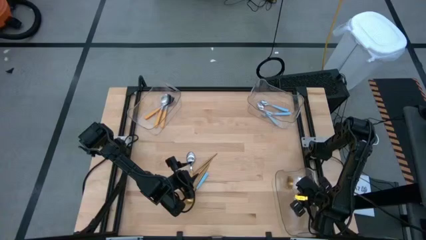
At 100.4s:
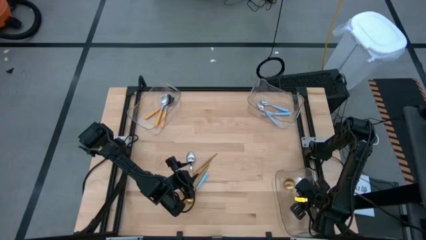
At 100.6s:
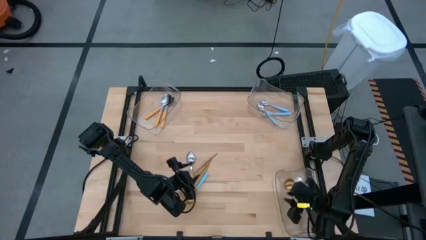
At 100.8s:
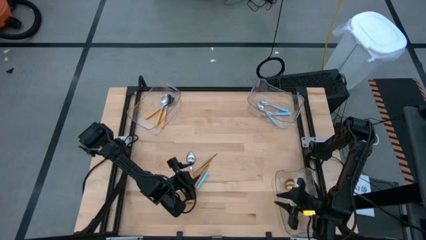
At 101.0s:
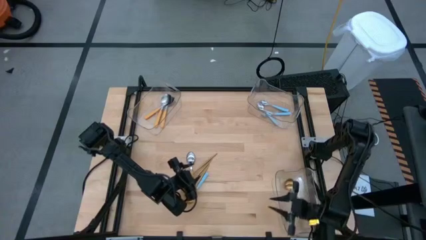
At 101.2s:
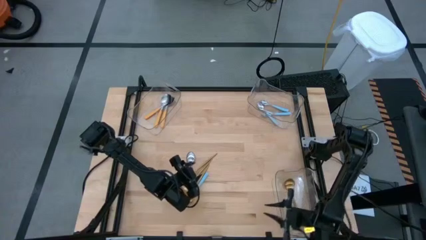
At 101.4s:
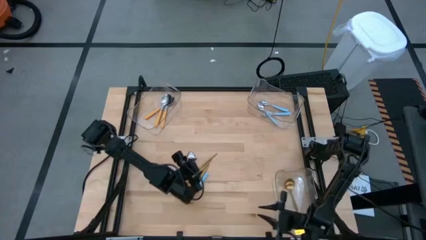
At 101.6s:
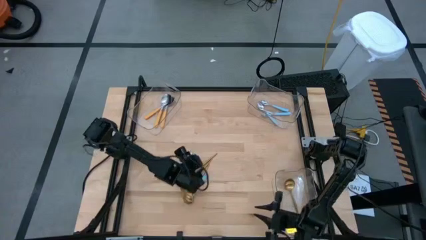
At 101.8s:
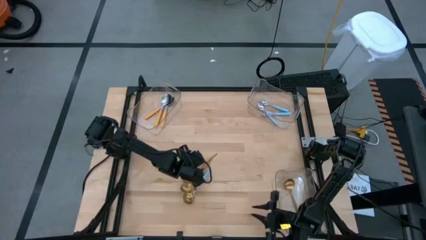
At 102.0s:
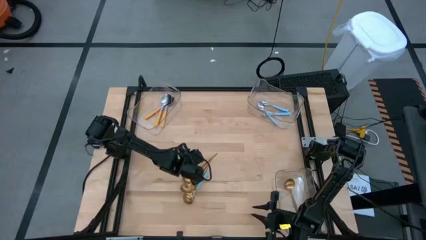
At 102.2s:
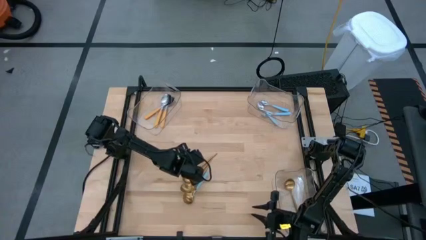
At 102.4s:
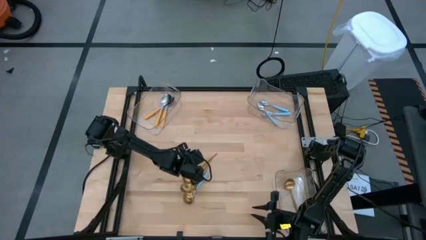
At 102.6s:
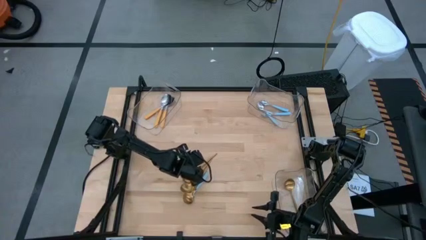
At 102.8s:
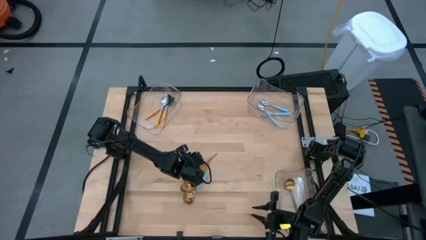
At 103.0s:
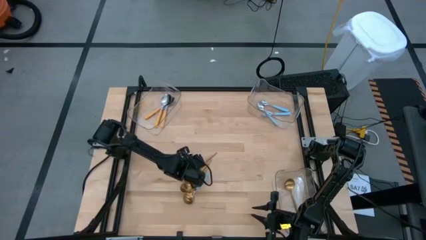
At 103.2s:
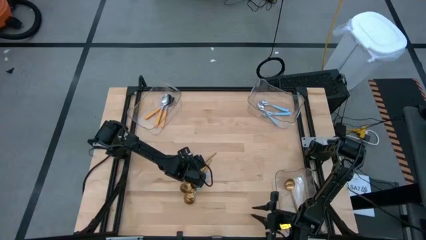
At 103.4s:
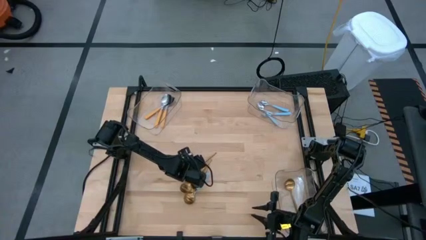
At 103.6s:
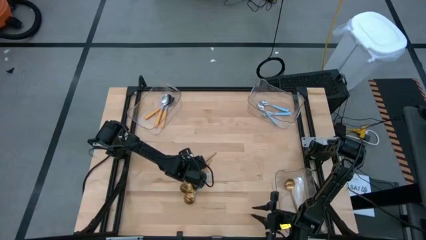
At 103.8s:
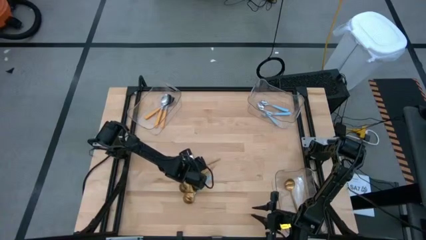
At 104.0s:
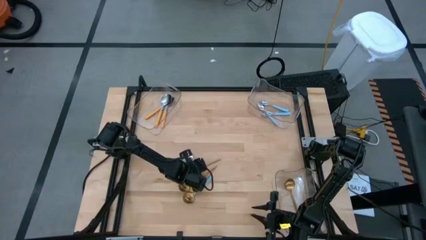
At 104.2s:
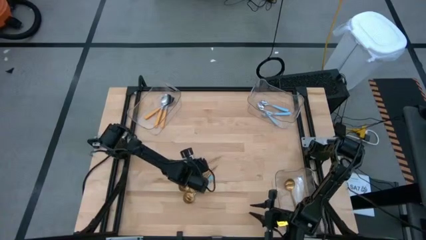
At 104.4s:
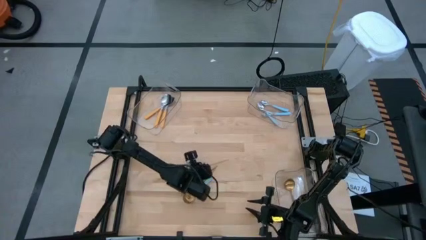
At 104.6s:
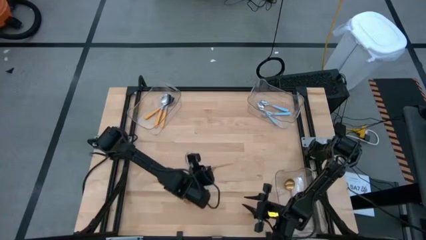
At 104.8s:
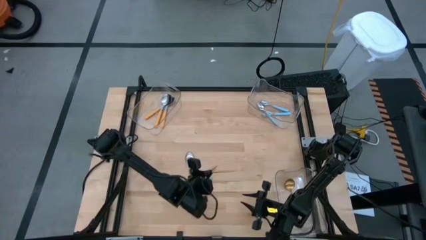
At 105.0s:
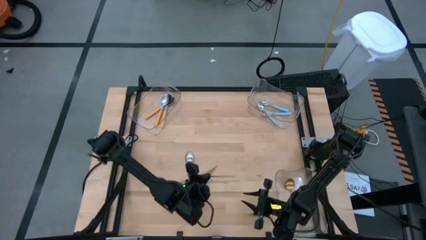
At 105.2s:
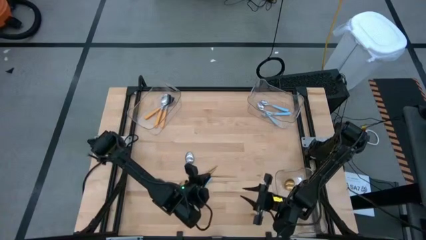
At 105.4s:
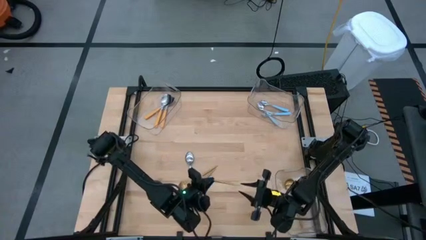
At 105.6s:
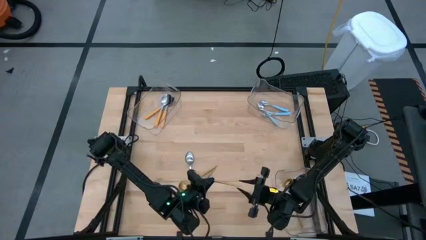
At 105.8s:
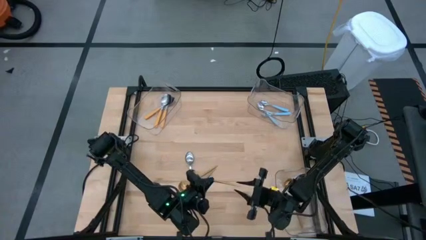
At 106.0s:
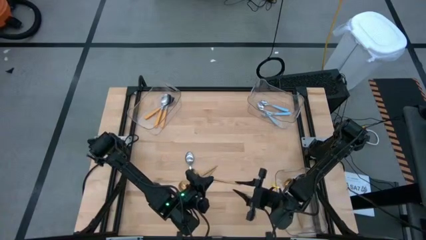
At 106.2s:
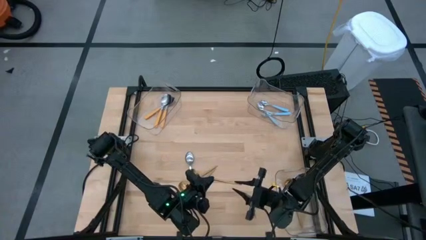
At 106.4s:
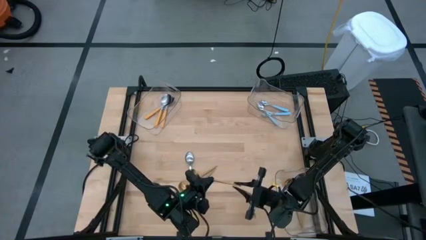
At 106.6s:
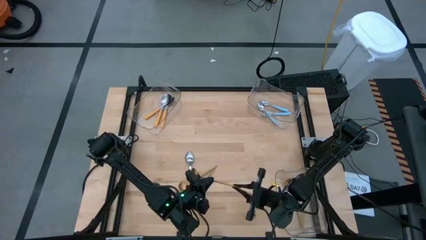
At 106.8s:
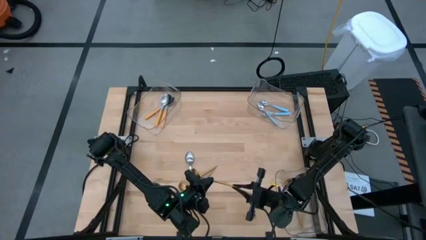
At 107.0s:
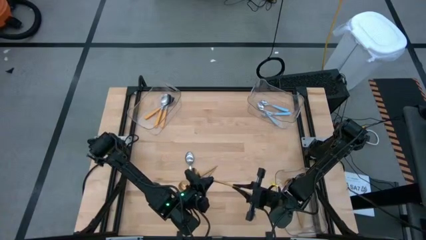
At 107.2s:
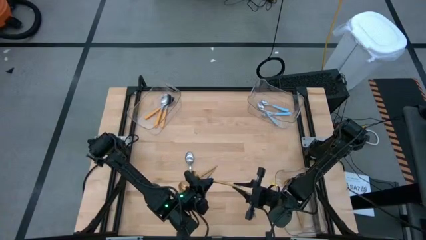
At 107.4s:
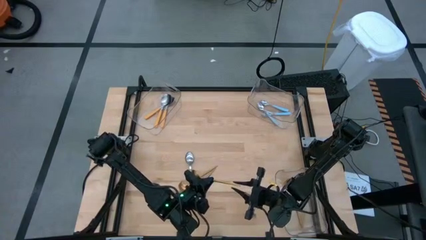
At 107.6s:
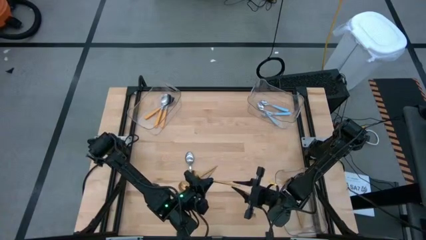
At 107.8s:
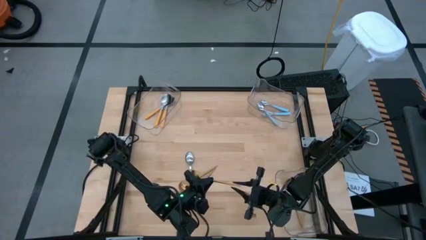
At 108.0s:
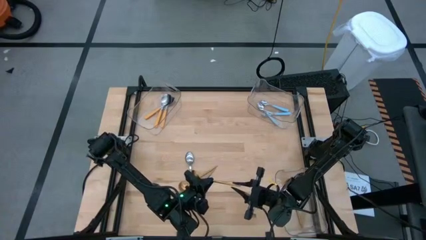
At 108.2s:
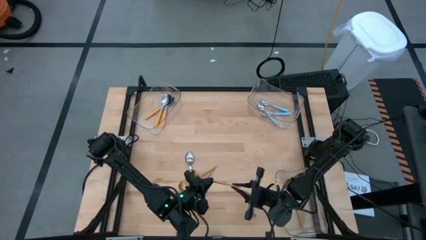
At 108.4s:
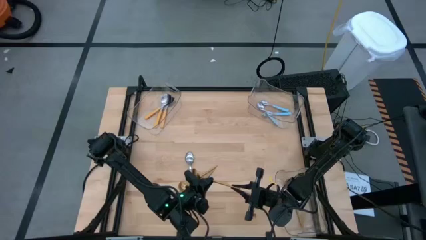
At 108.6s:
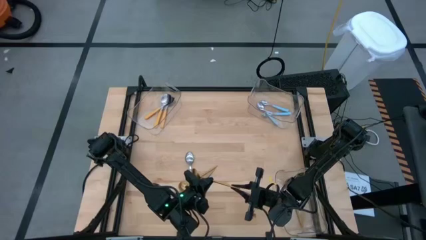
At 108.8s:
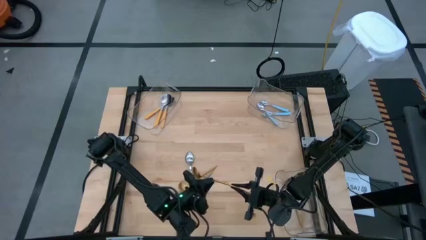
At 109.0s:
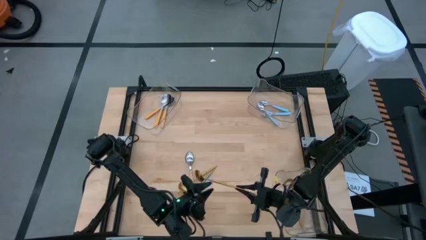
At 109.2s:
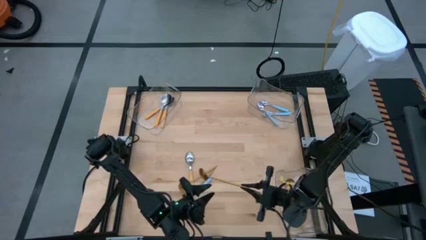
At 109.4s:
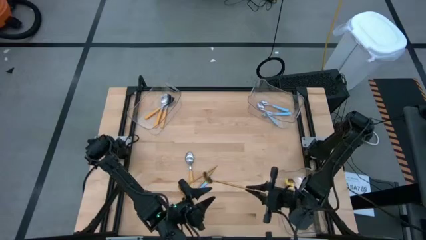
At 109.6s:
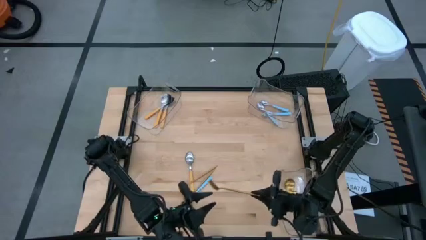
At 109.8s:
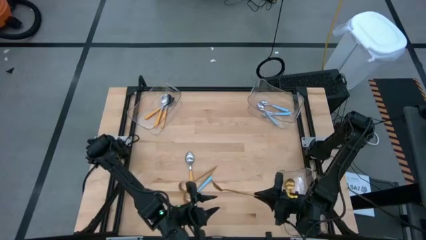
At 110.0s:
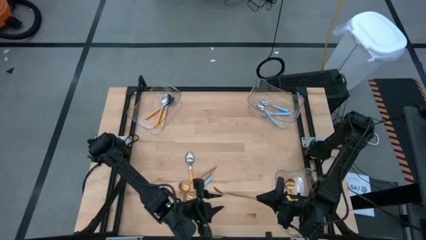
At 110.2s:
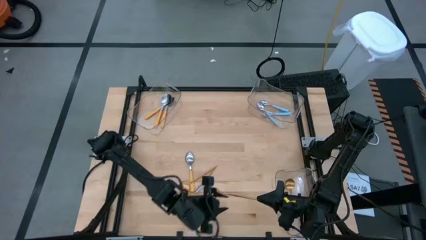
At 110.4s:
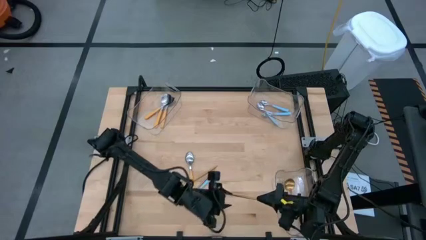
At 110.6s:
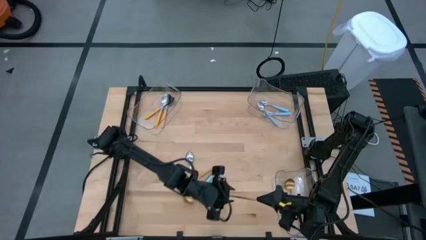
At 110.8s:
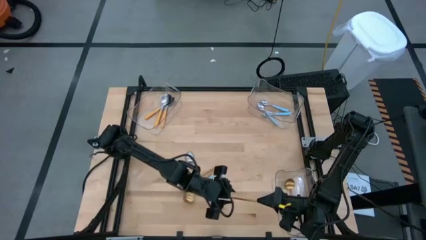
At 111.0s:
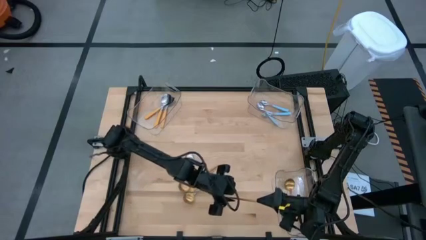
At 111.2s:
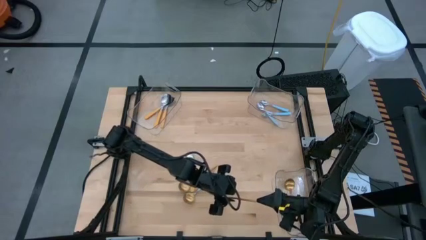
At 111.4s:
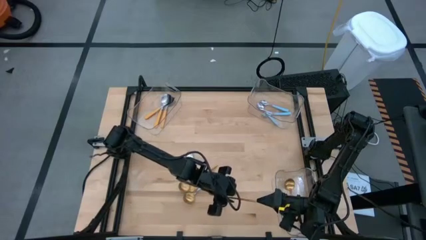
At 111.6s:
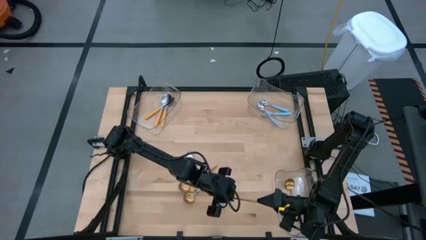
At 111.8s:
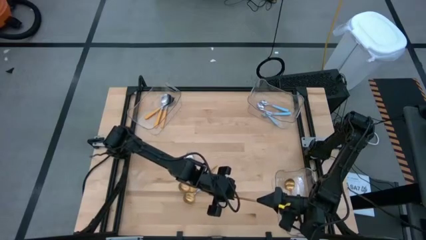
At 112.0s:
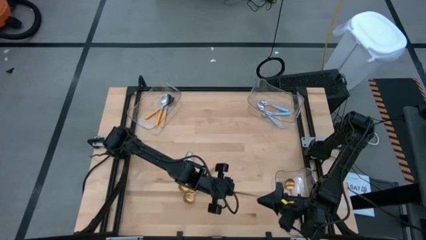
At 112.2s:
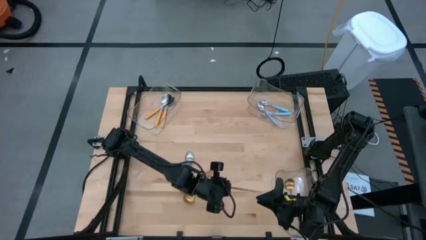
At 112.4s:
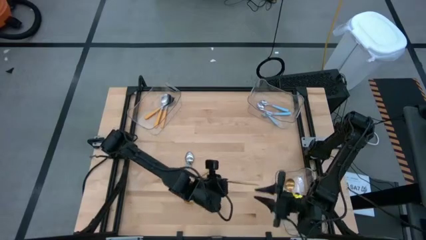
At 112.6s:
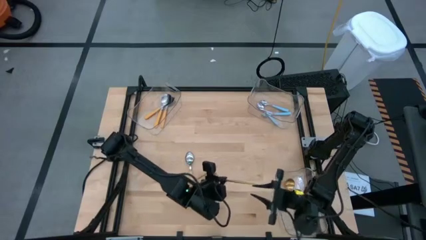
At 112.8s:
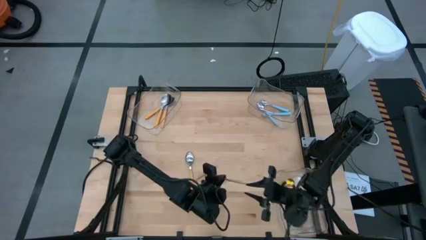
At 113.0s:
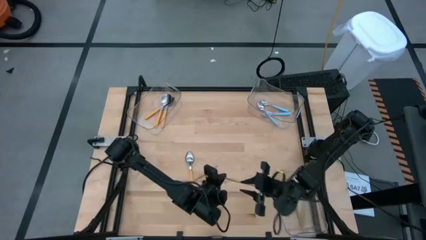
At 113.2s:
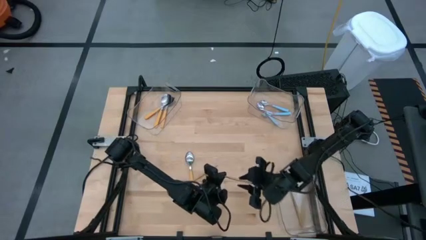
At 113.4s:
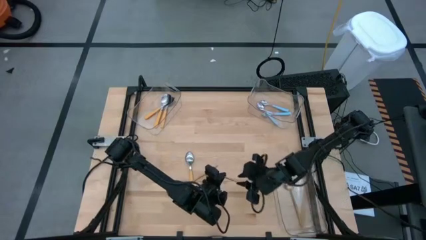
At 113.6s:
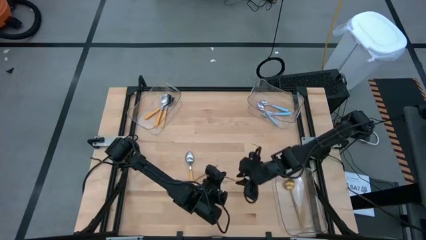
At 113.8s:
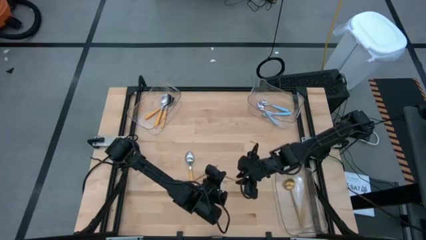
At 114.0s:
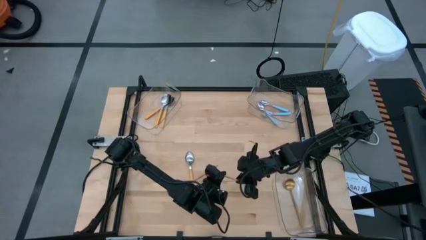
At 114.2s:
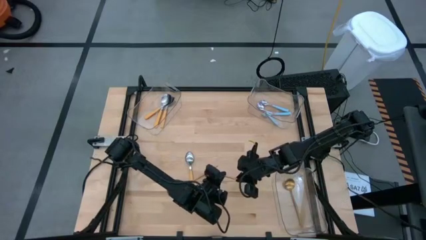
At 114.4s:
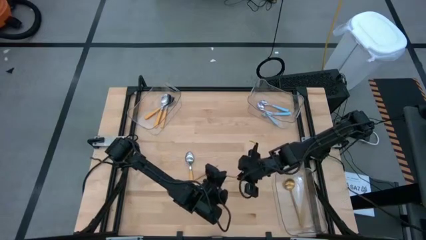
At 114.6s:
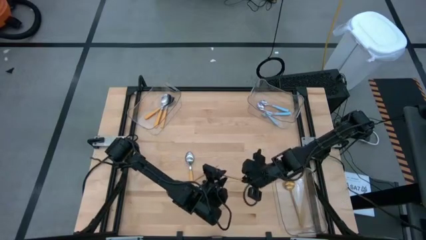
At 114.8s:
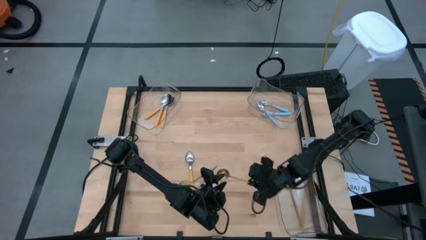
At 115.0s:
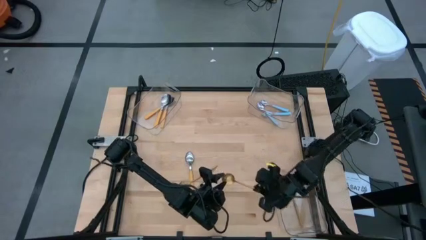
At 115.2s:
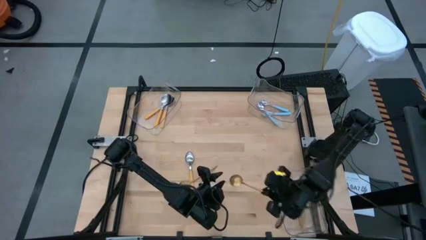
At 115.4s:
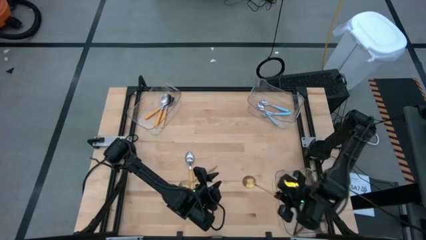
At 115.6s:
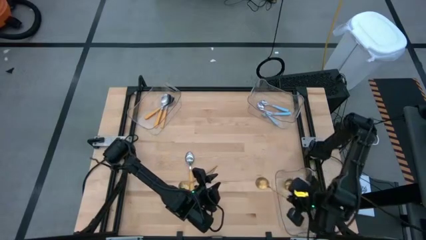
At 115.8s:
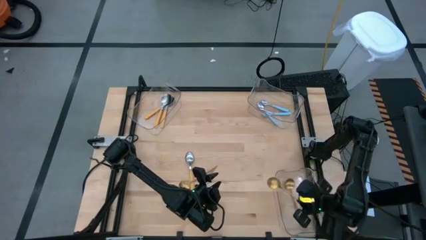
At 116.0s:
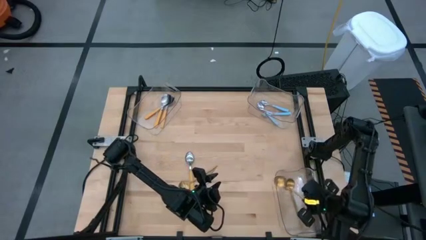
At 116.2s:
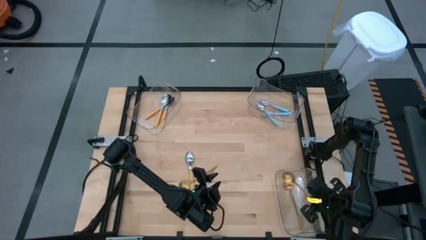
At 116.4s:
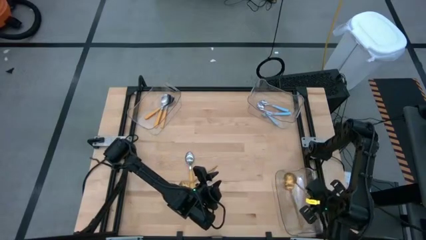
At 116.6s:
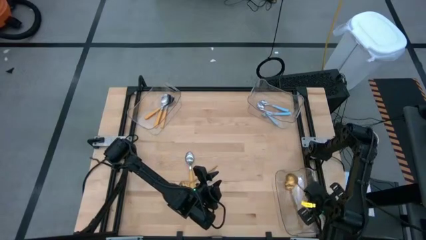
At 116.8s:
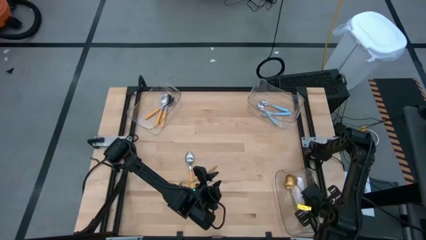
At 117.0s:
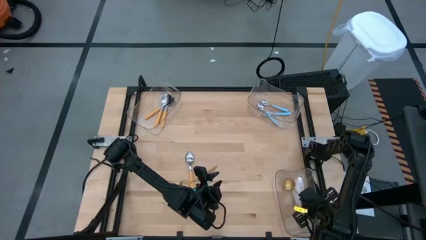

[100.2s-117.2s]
Task: Sort silverware by color (type)
Put the gold spoon into the bottom transparent bin

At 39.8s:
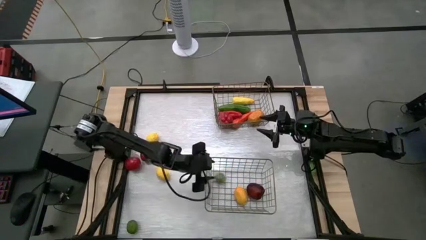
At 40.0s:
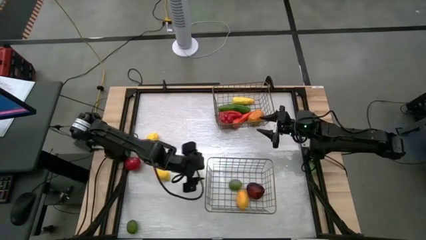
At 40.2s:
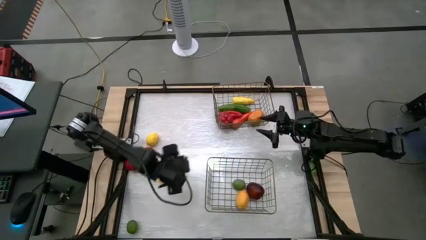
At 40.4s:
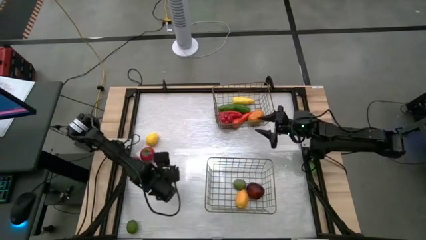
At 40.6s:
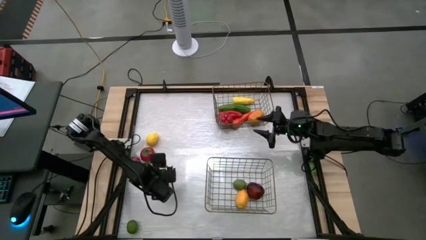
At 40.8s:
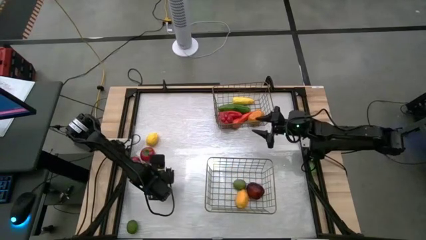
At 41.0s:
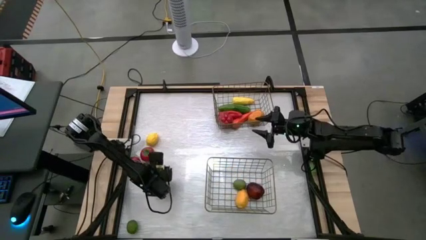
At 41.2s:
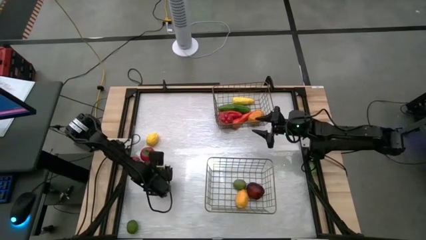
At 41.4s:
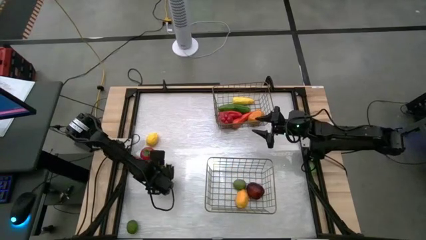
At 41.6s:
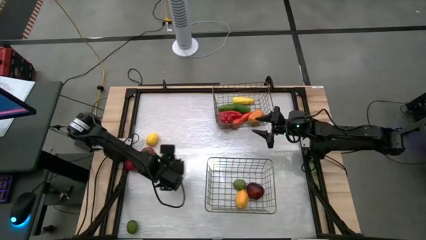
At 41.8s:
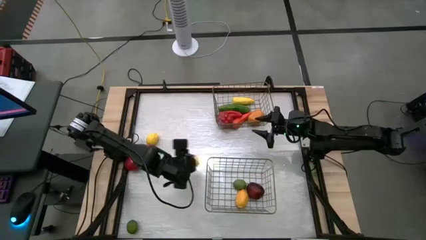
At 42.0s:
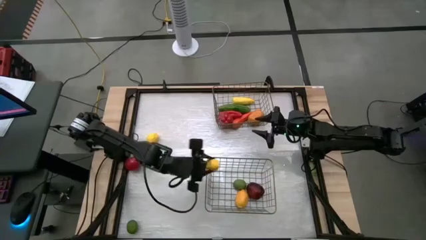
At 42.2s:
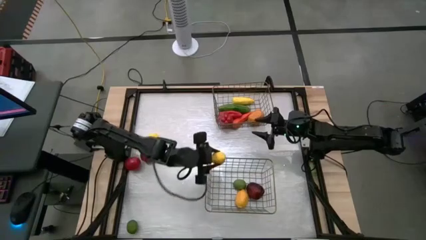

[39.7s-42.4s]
Task: Sort produce into baskets
Put the bottom yellow lemon into the bottom wire basket
